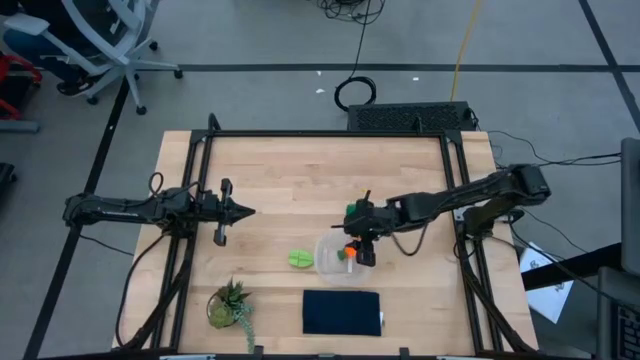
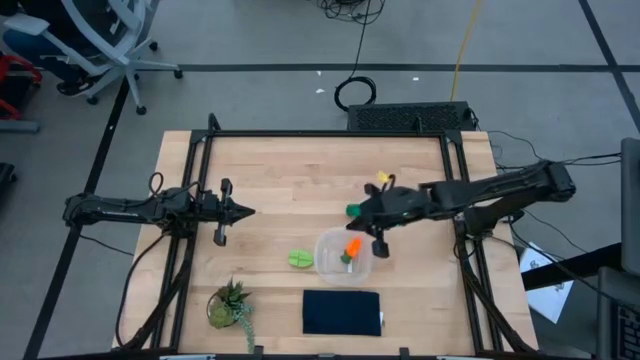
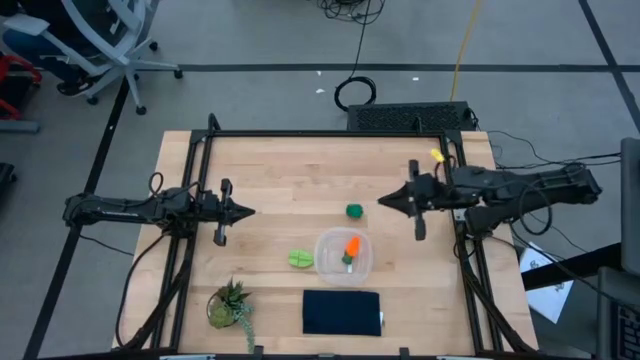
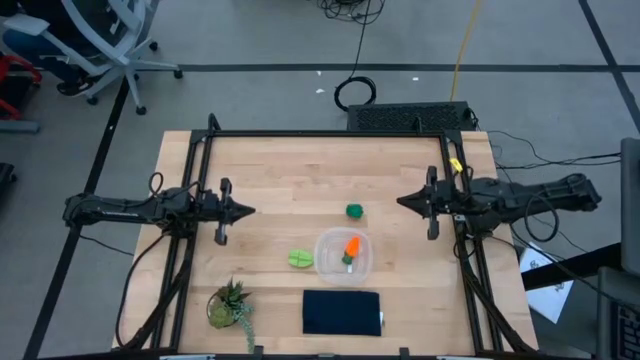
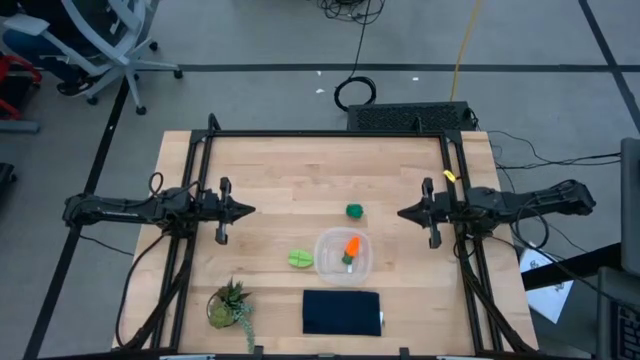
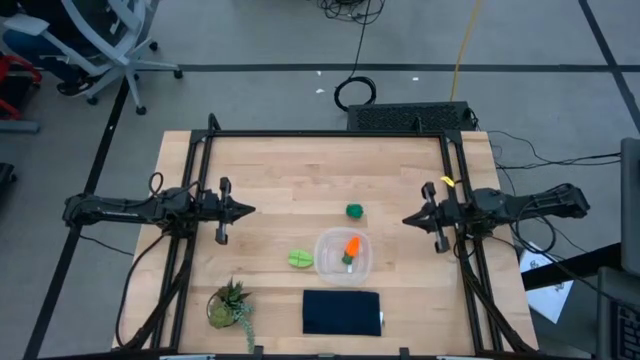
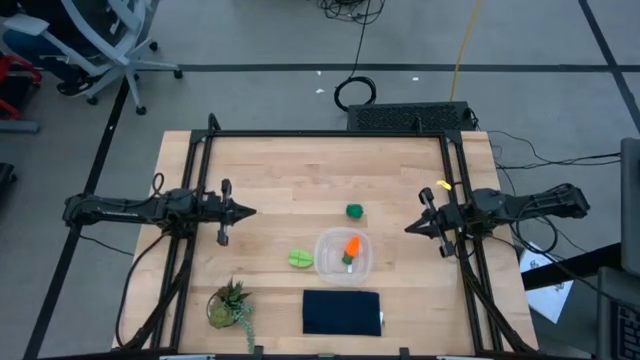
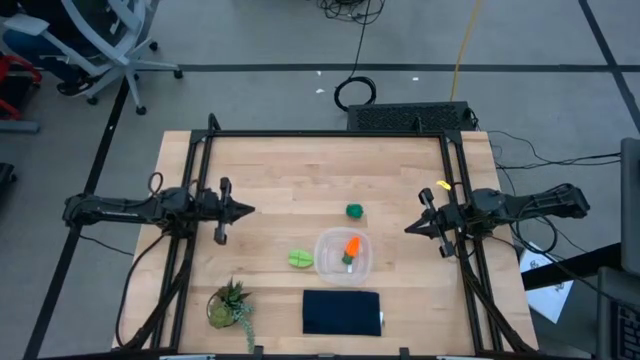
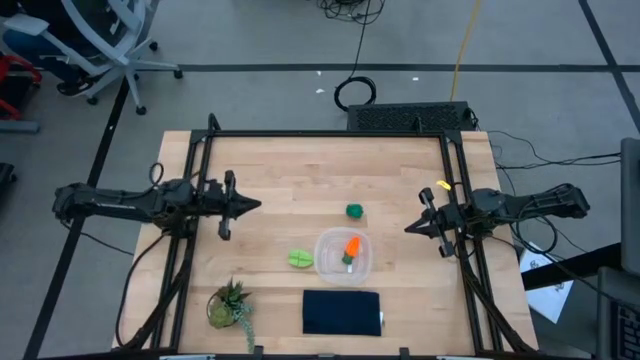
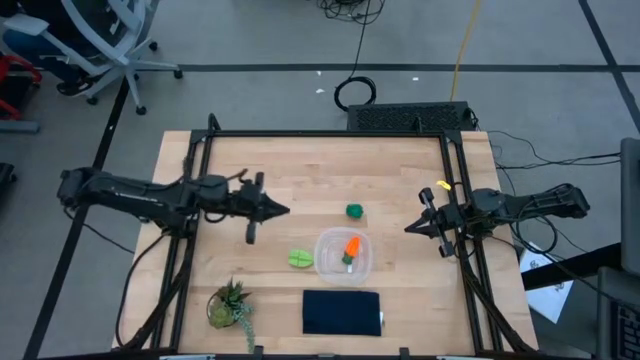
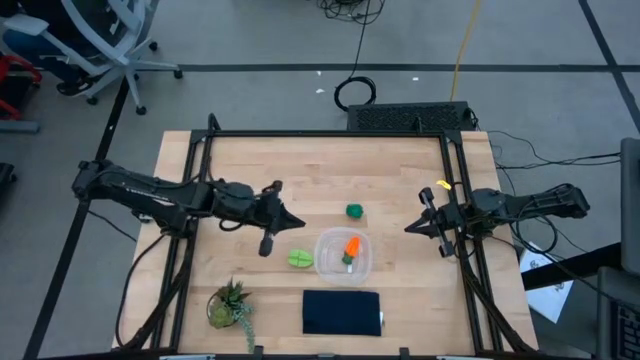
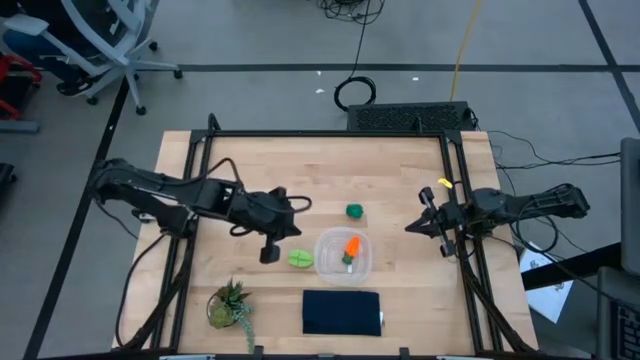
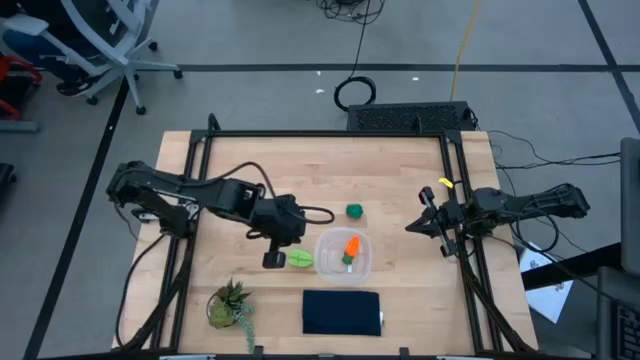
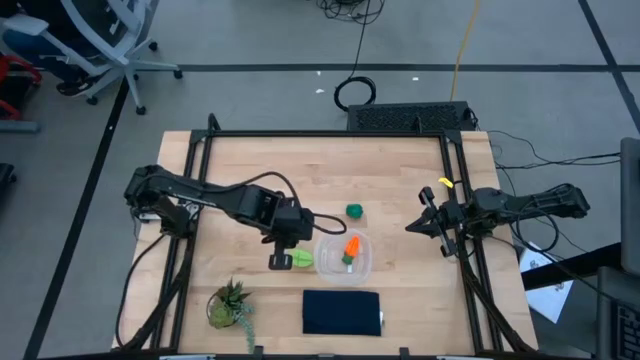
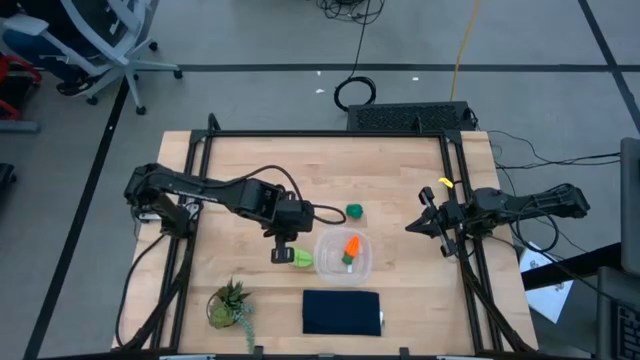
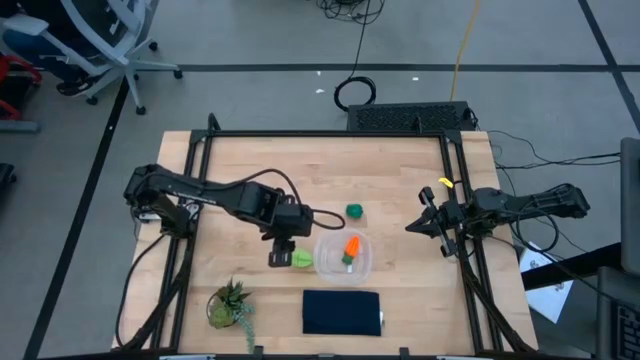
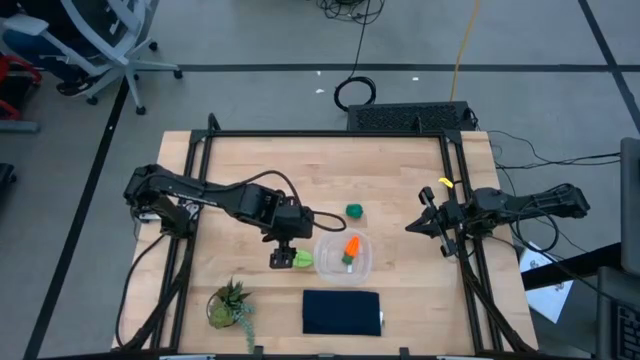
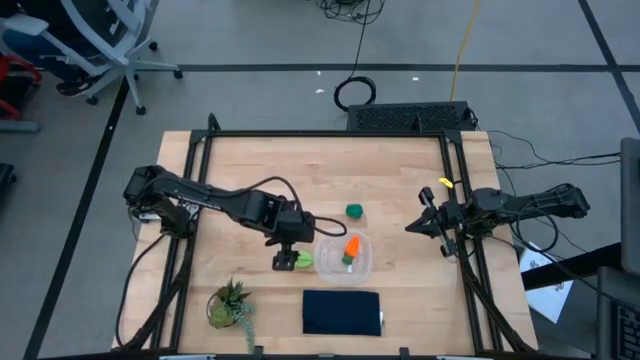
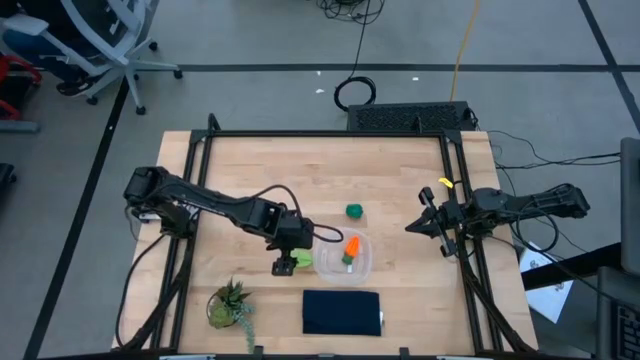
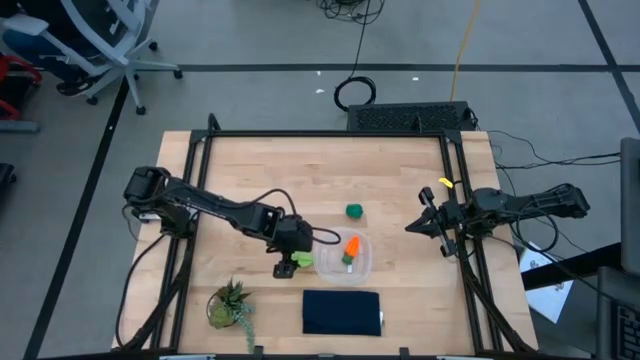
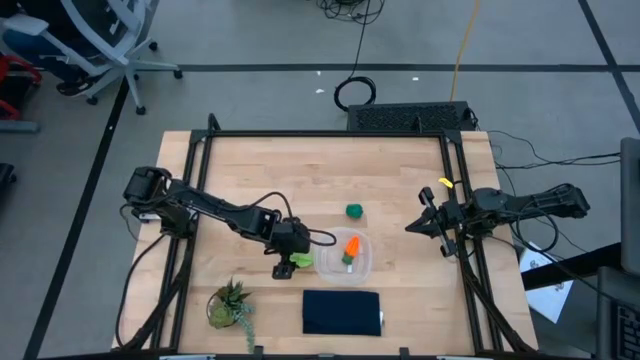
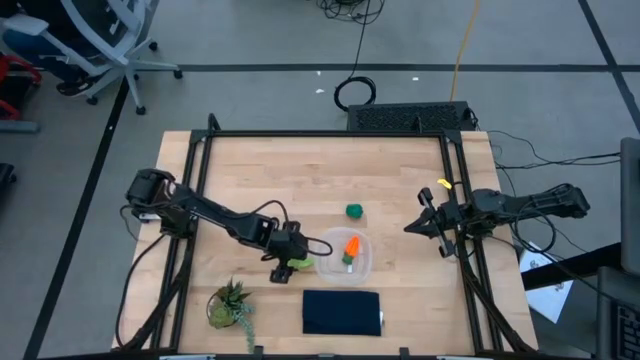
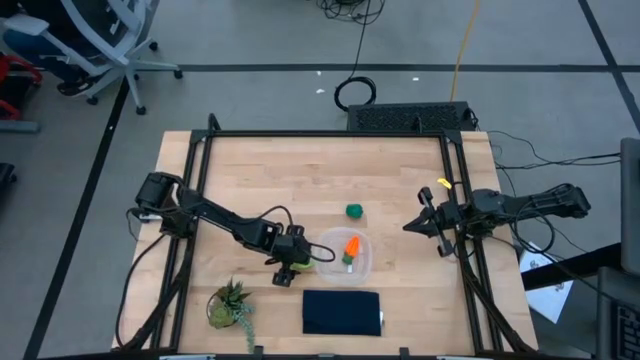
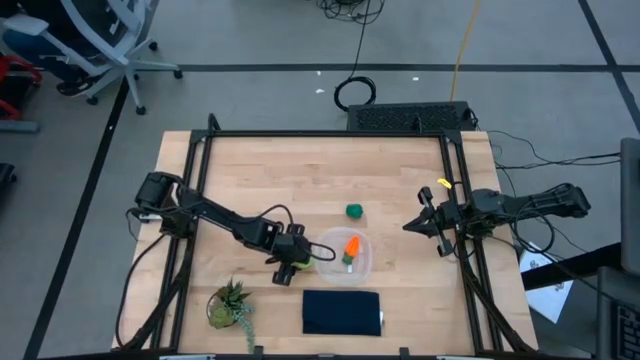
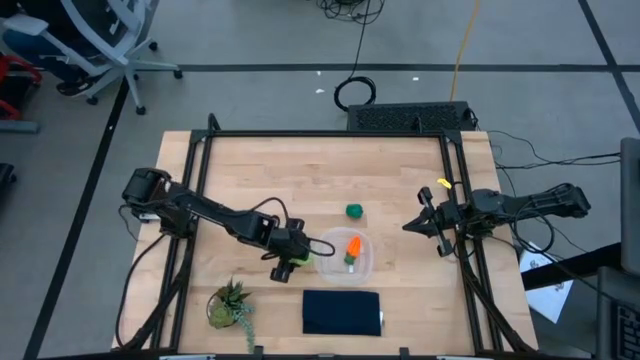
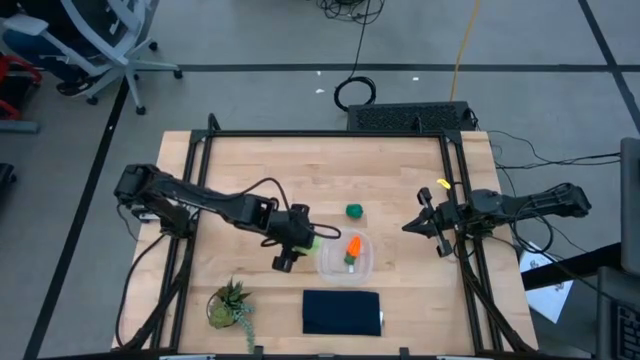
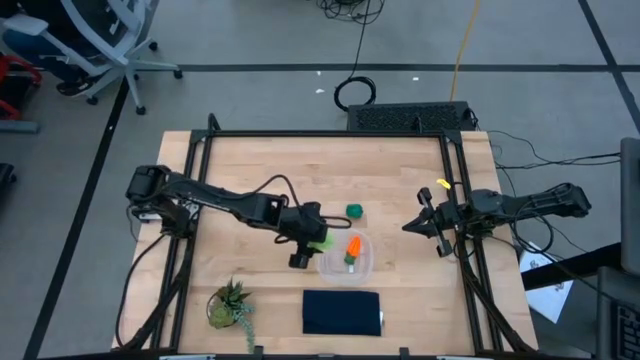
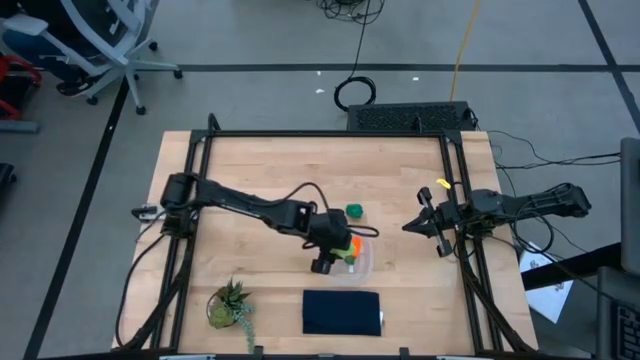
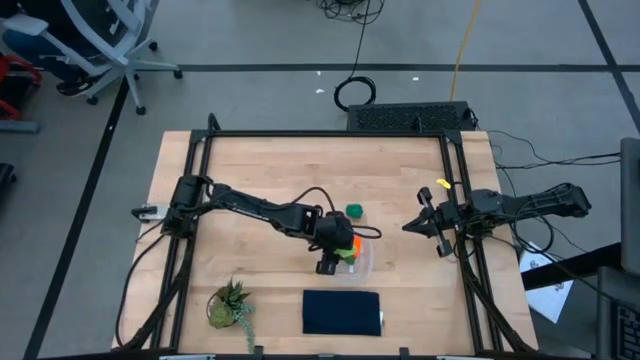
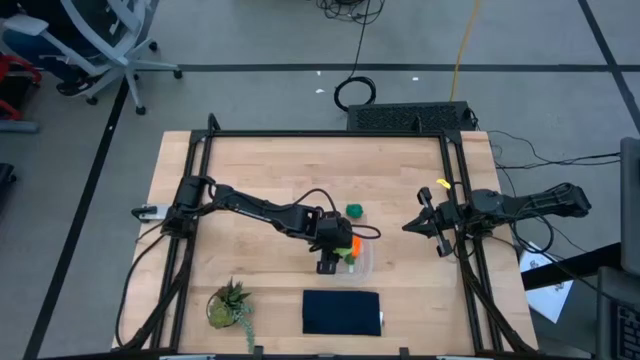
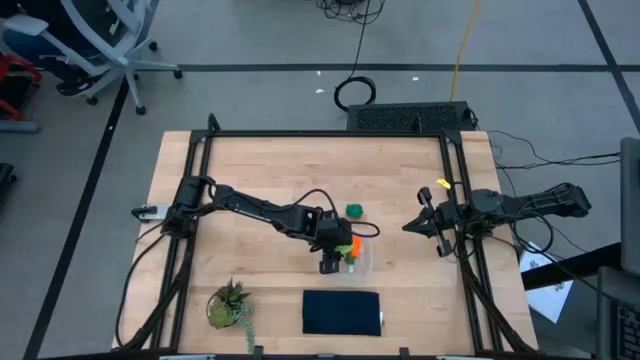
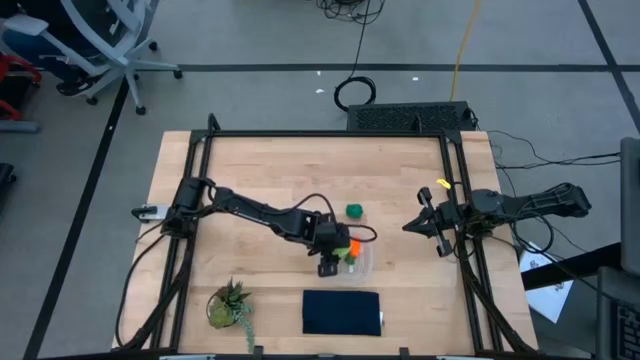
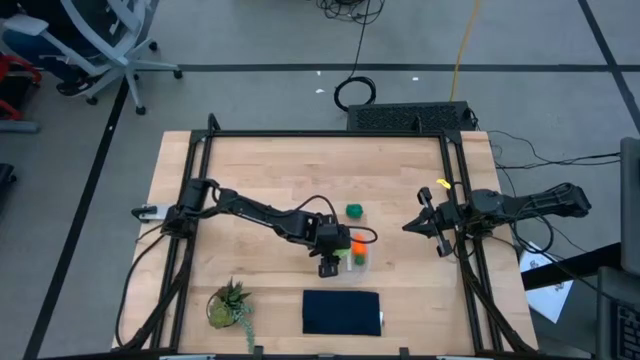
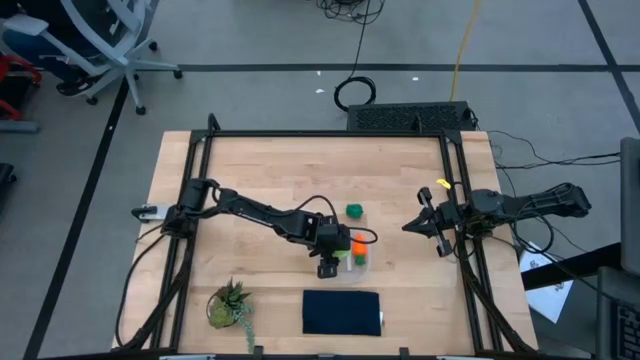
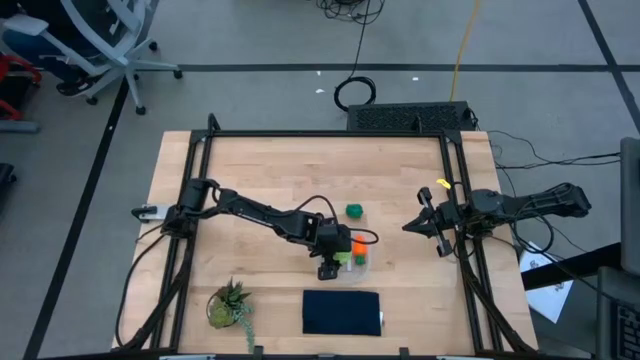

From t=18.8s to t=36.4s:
Task: Pick and placing Produce into tupperware
Put the green starfruit into the transparent bin

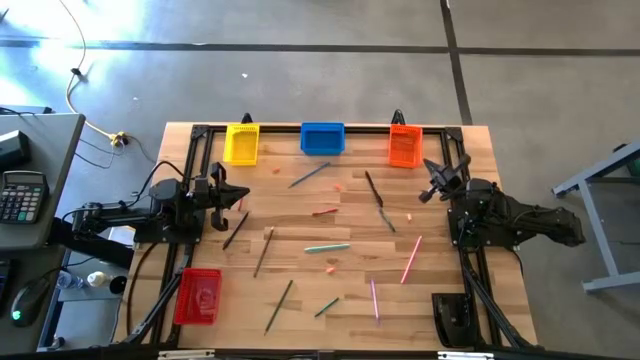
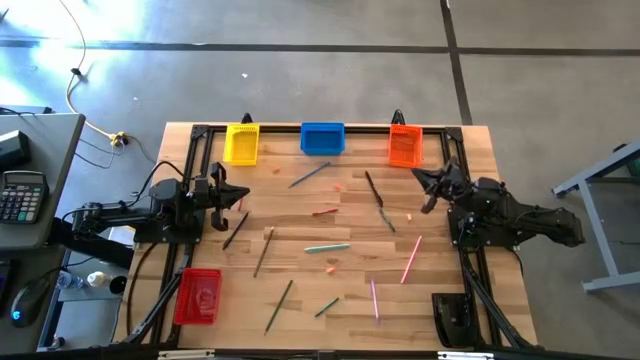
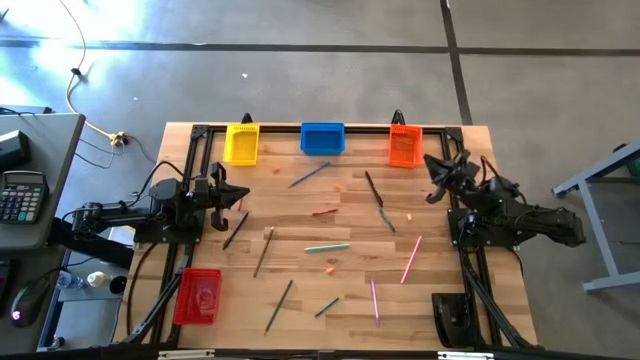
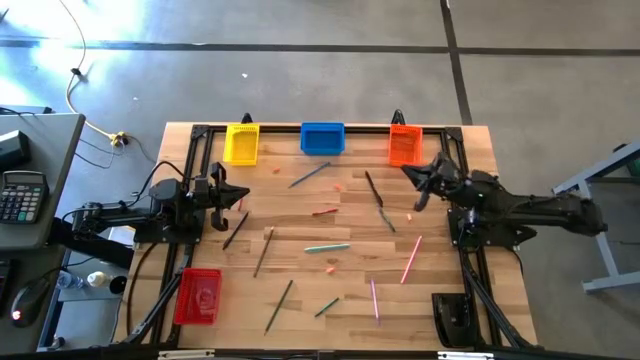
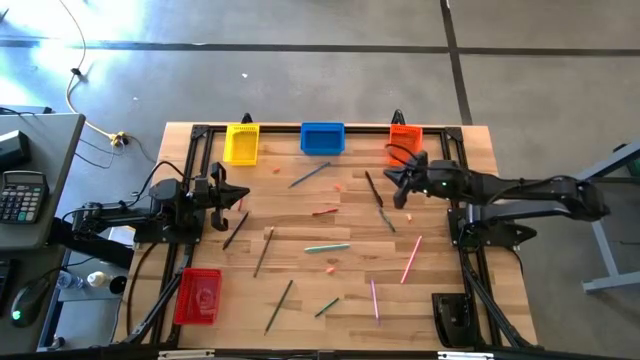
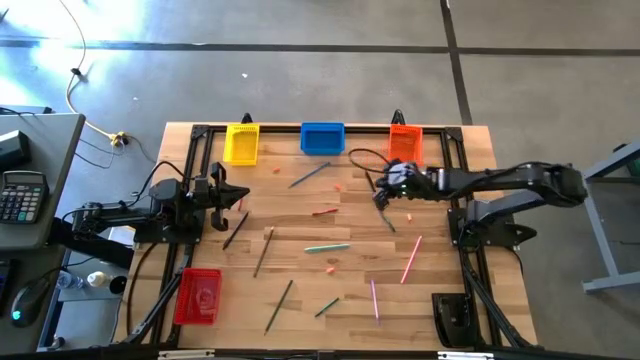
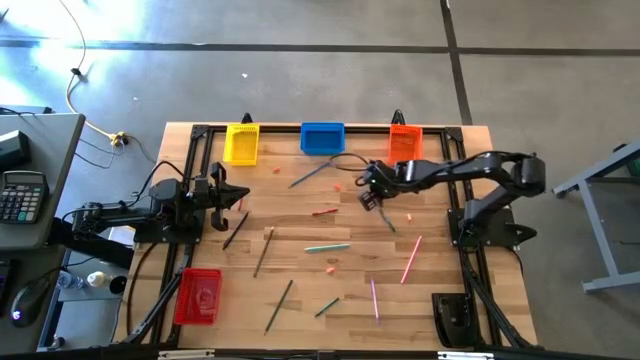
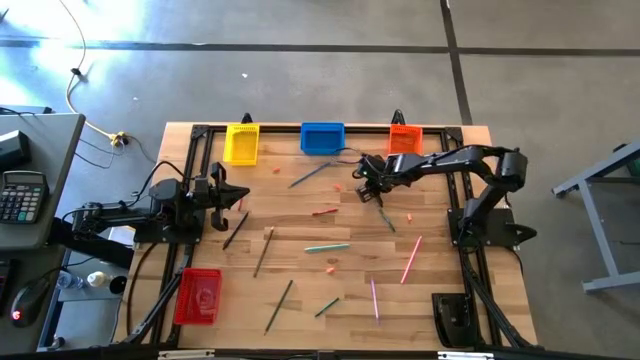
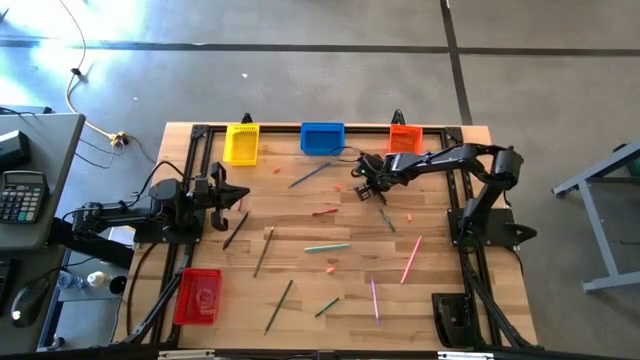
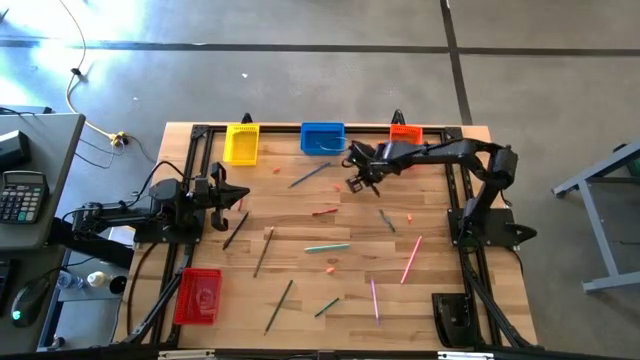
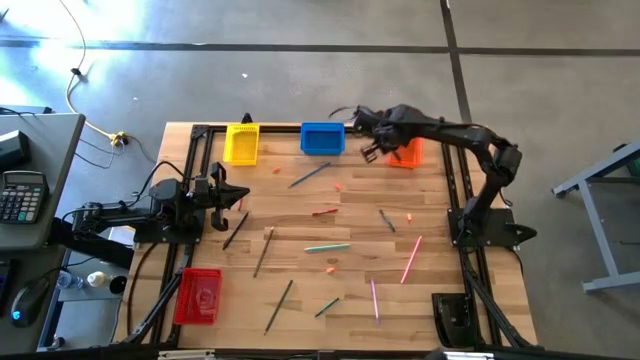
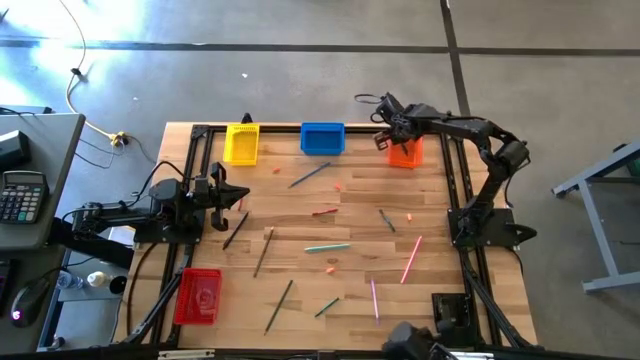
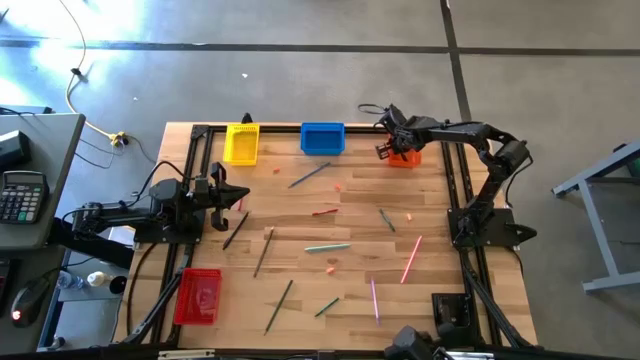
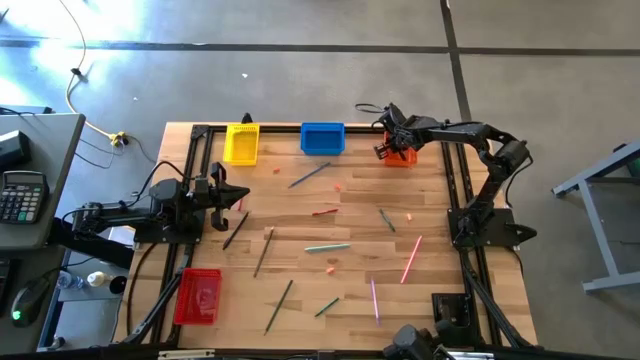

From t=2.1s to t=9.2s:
Task: Sort crayons/erasers/pens/pencils in bins
Put the black pen into the orange bin
